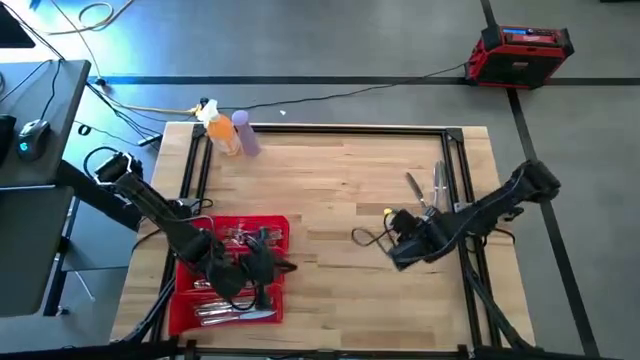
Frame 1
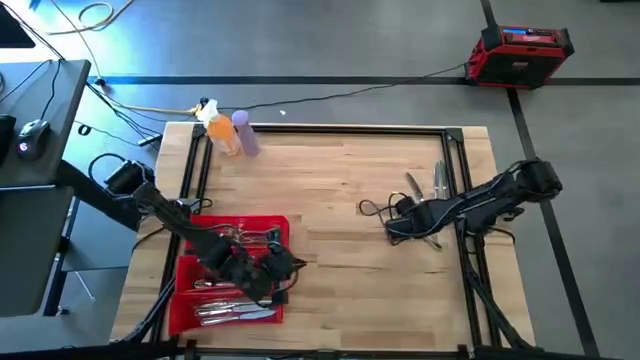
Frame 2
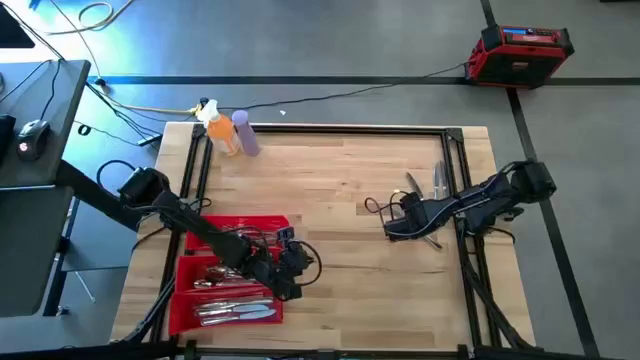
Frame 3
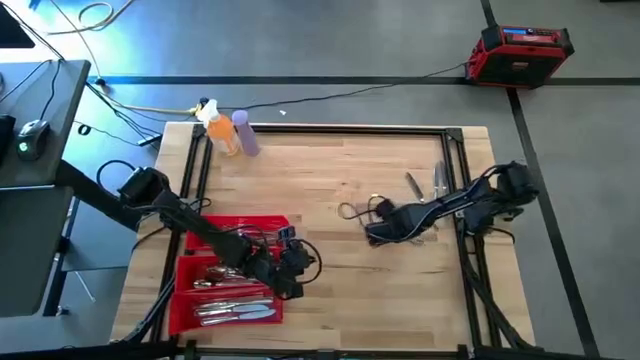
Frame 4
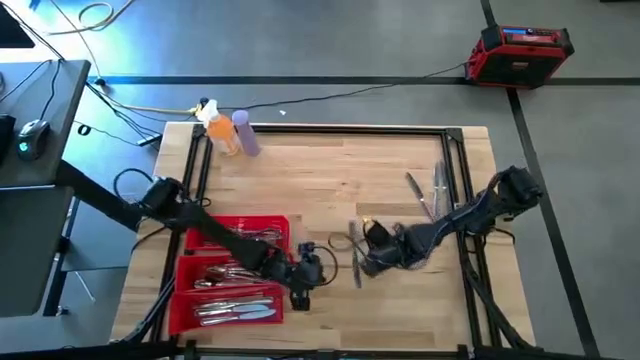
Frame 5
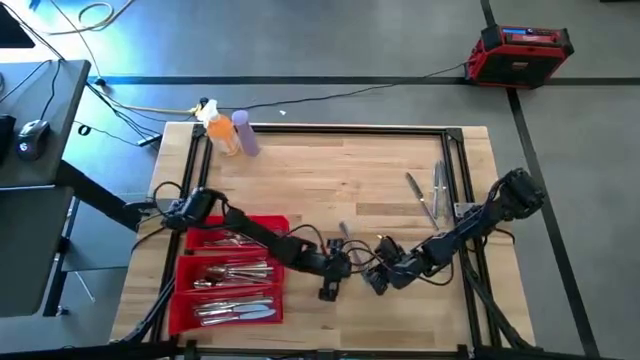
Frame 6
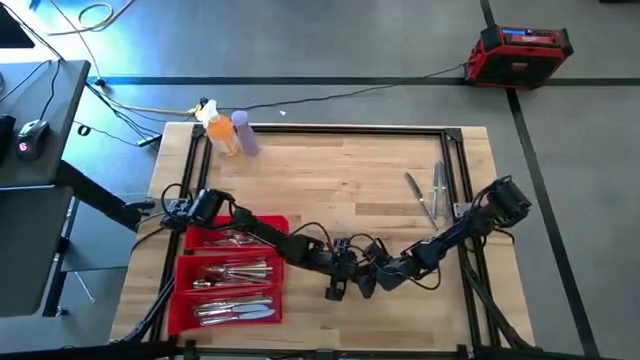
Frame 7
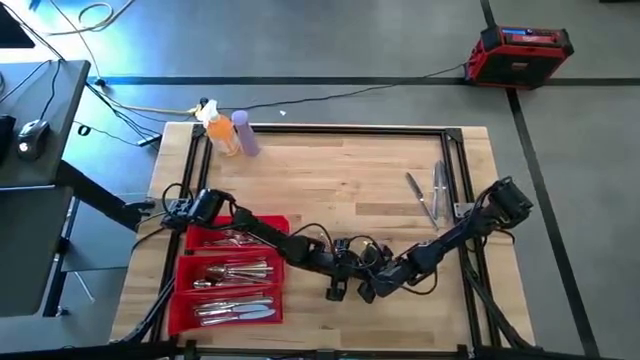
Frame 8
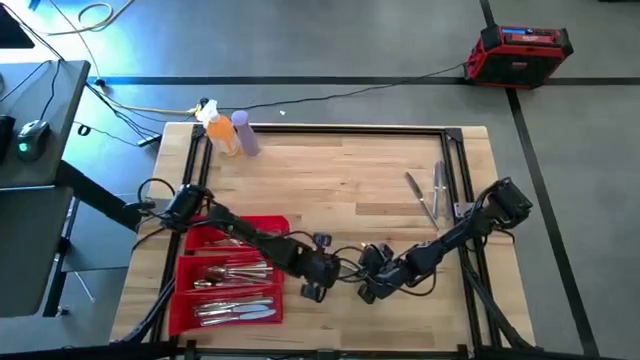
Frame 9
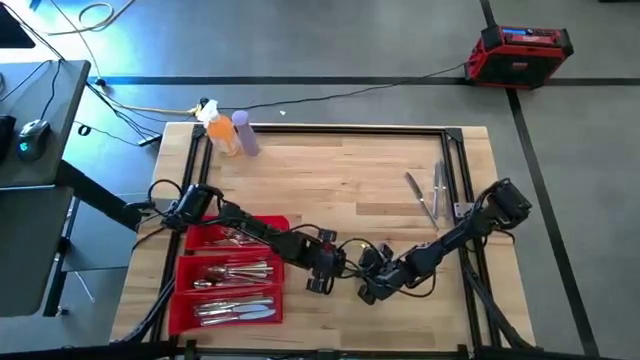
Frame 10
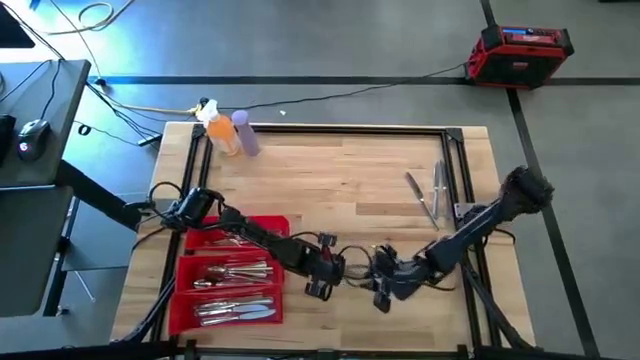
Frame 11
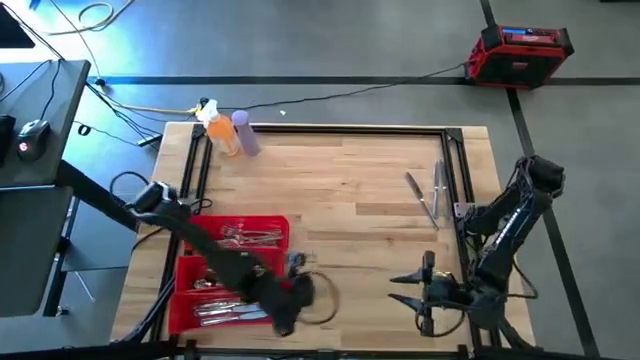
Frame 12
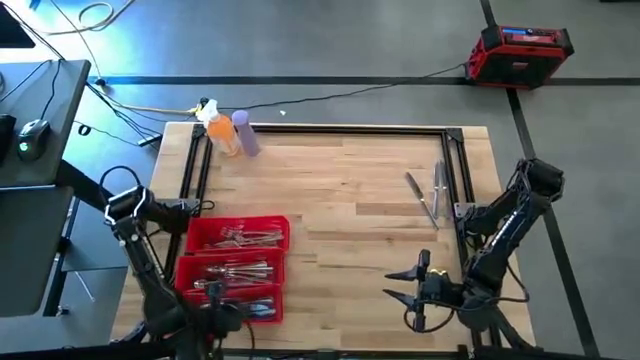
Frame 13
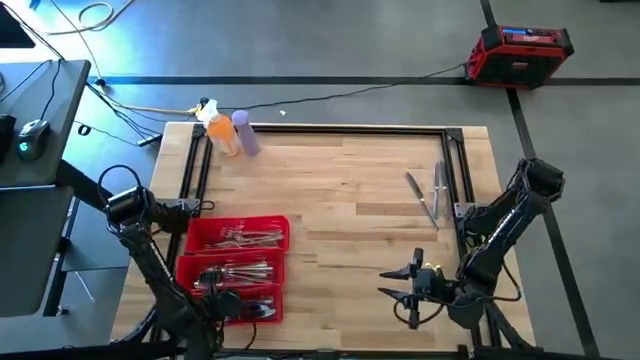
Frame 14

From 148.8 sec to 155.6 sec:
Task: Sort silverware
Put the silver knife in the bottom red bin

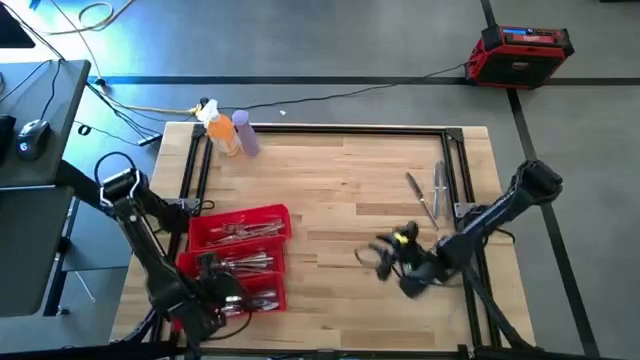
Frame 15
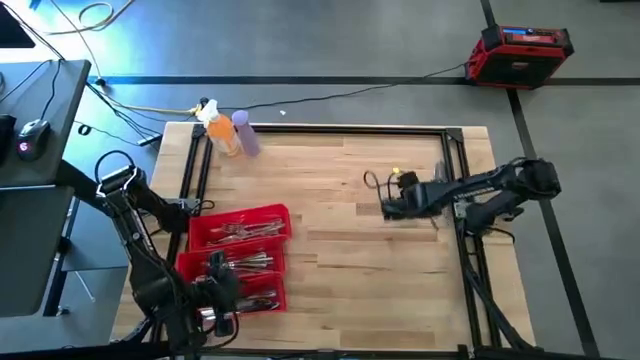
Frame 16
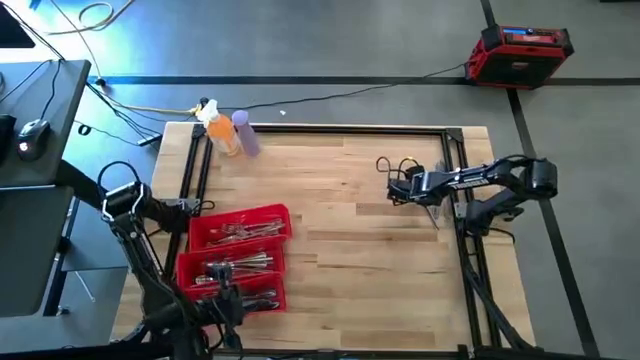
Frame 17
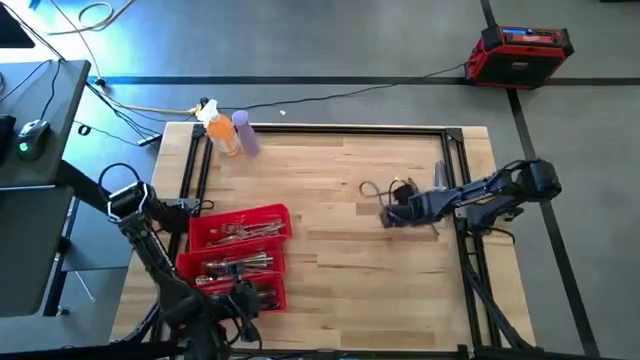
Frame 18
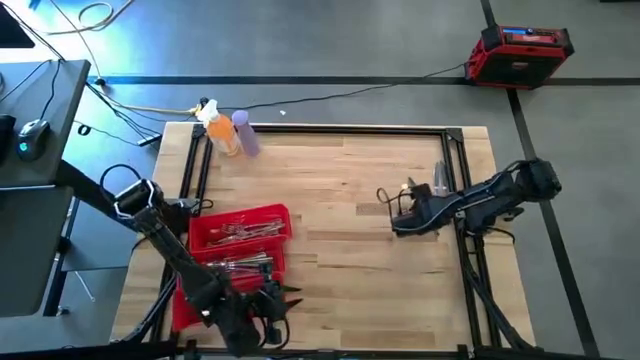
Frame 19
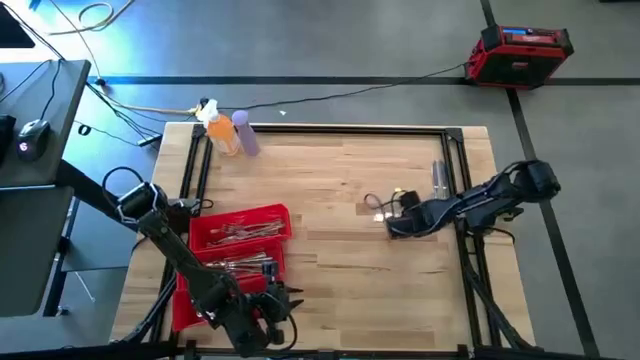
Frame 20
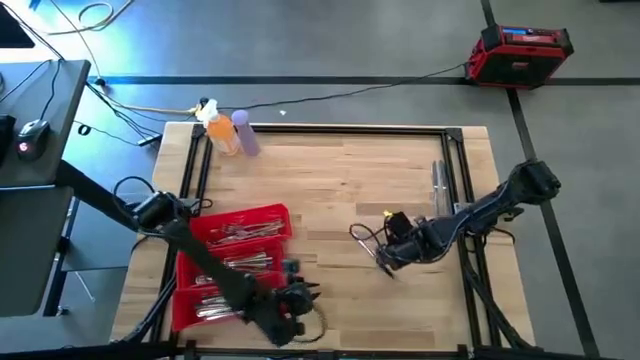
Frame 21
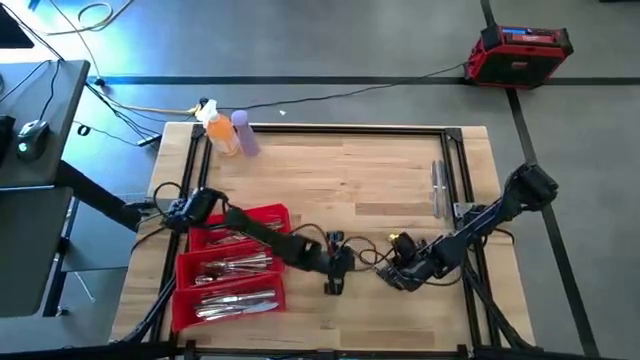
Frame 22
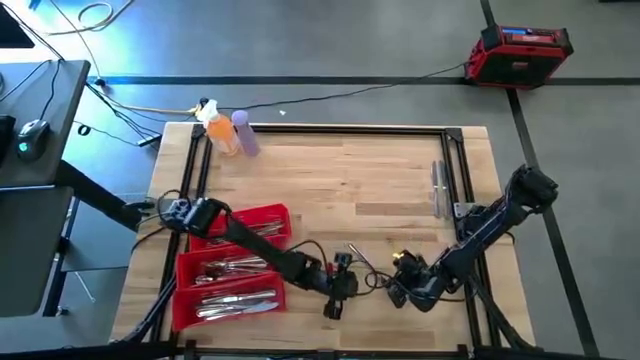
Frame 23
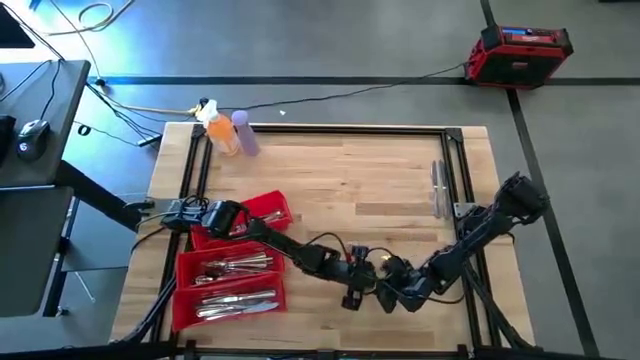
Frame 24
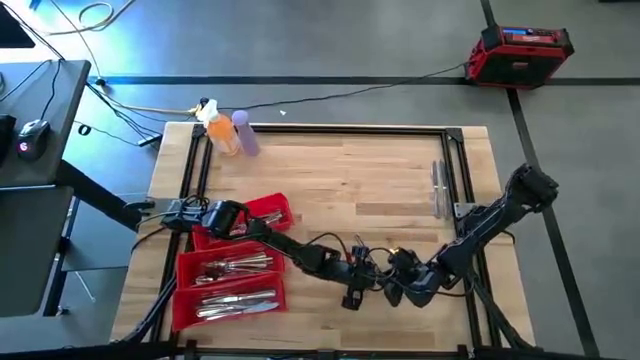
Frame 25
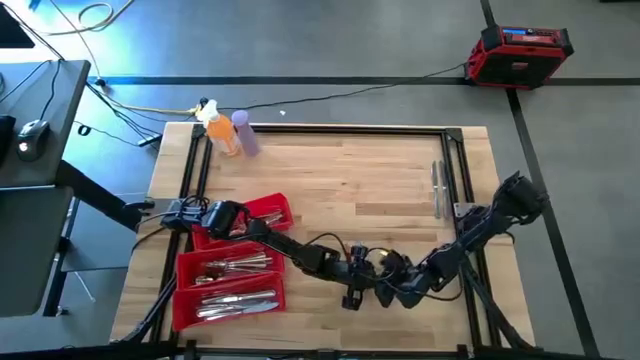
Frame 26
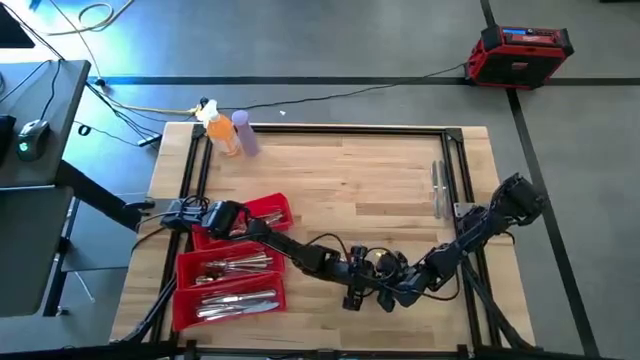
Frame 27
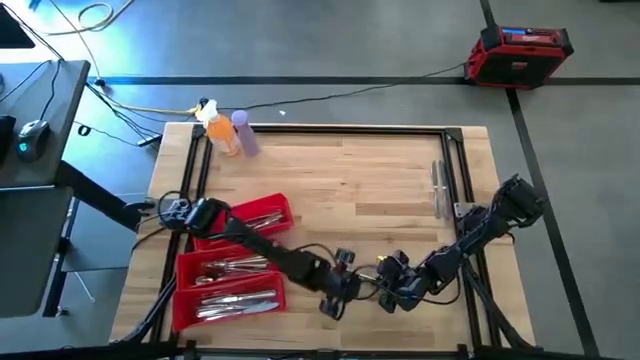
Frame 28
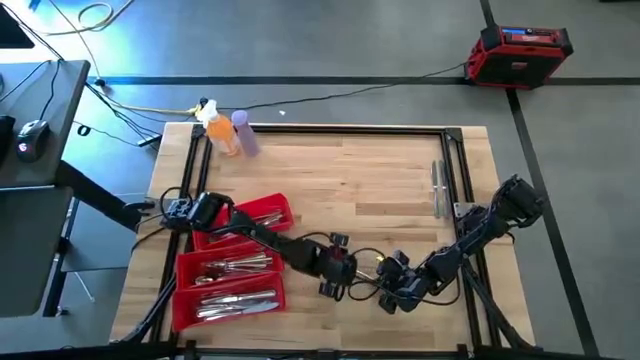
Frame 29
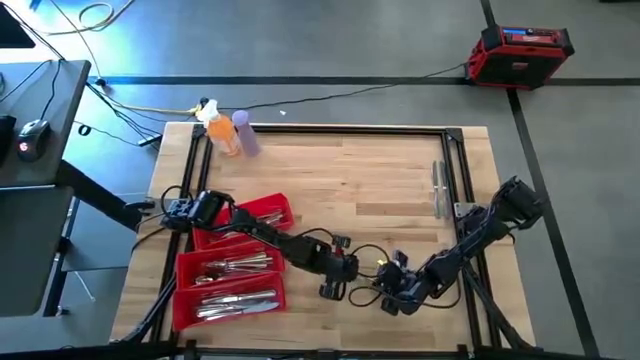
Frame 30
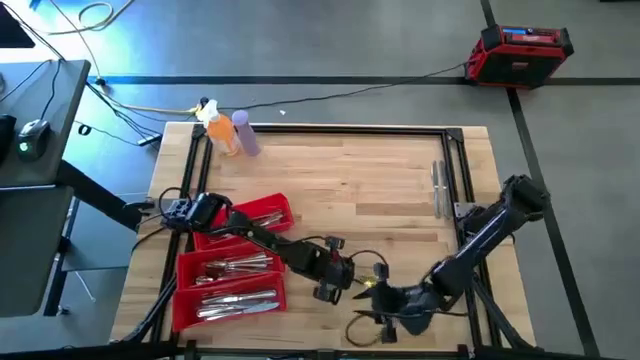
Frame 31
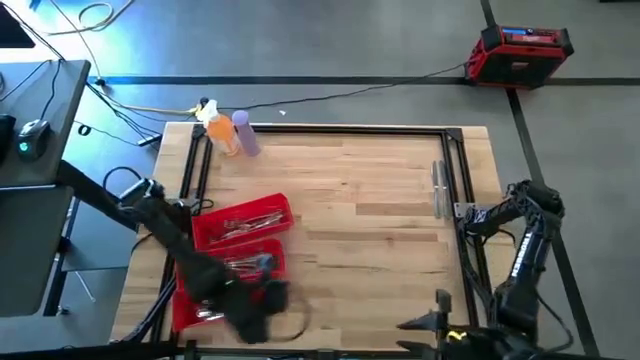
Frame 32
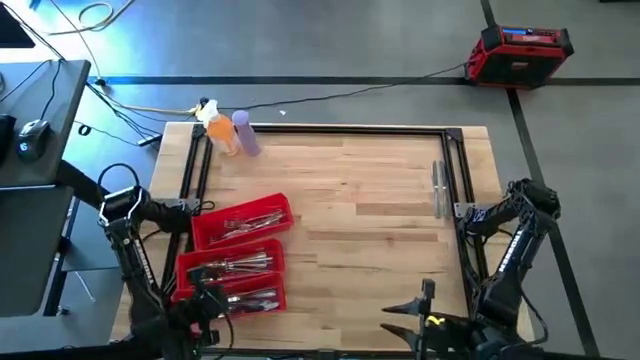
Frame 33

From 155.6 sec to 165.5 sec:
Put the silver knife in the bottom red bin

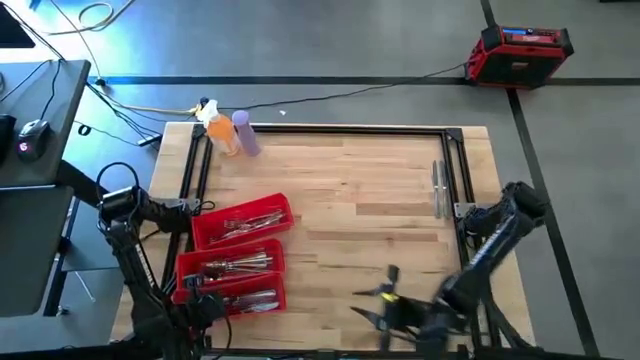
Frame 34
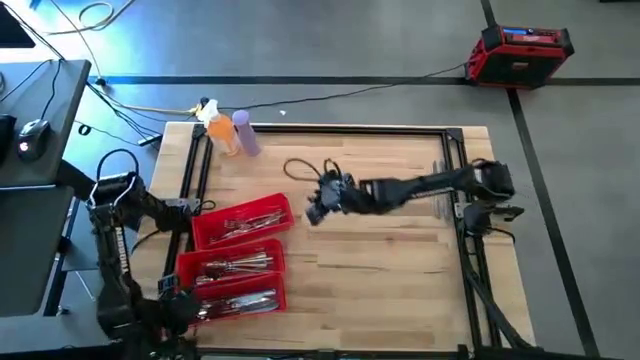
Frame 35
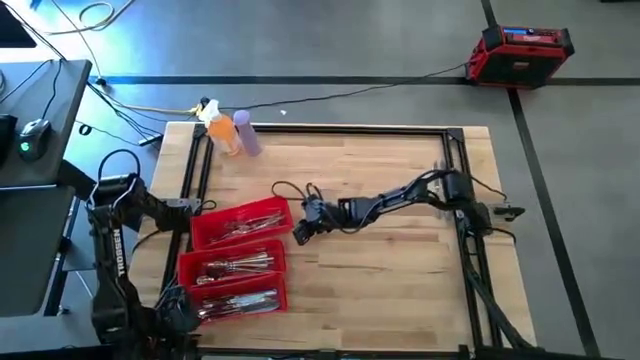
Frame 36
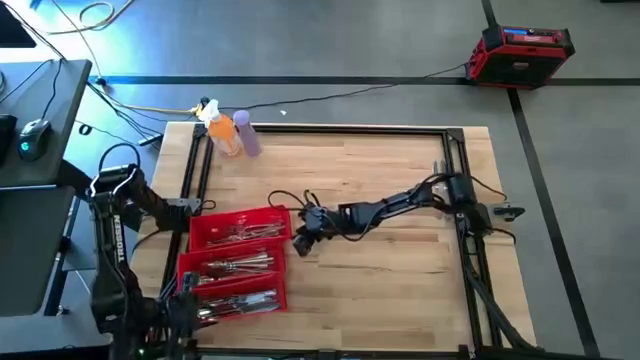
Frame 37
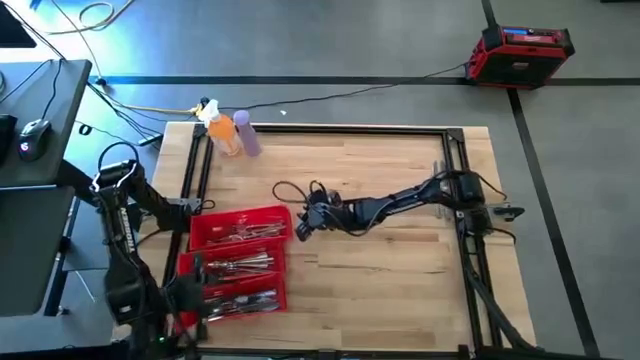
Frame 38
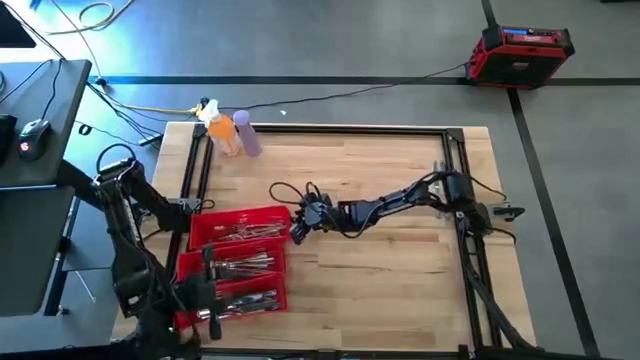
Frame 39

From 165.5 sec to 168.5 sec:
Adjust the top red bin

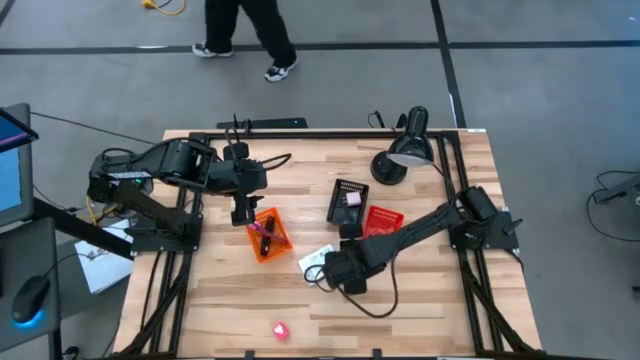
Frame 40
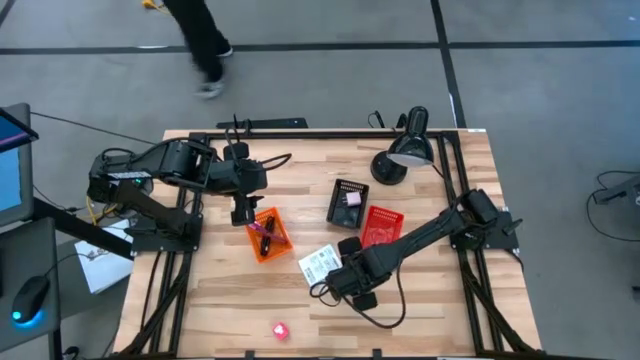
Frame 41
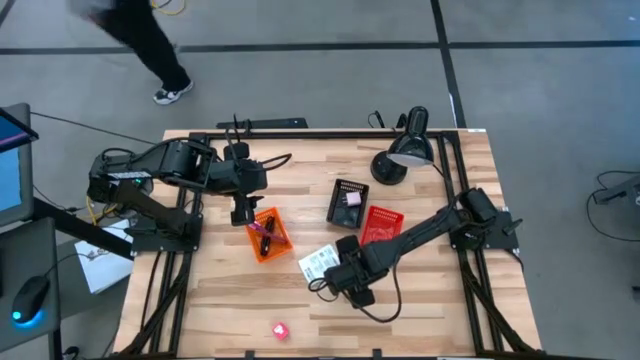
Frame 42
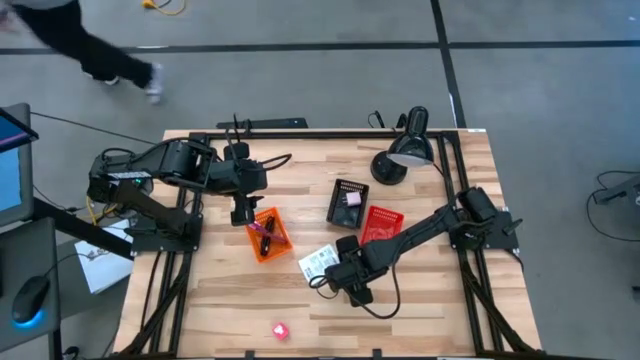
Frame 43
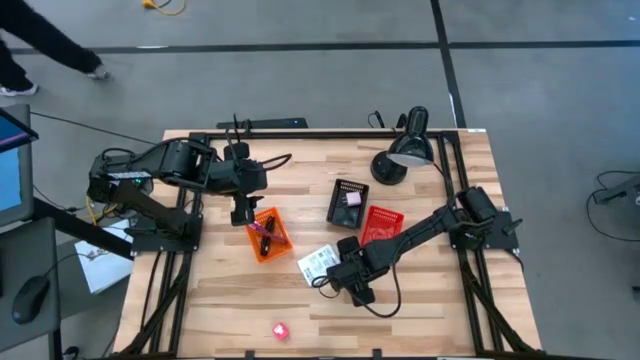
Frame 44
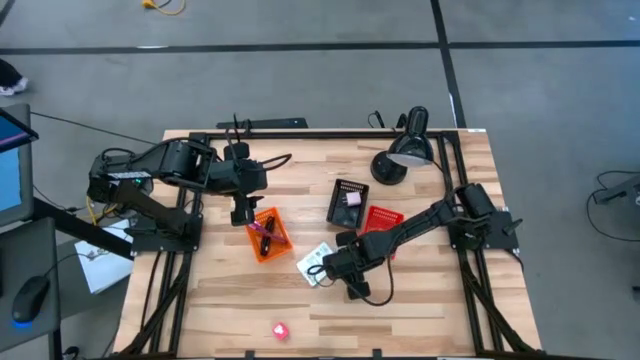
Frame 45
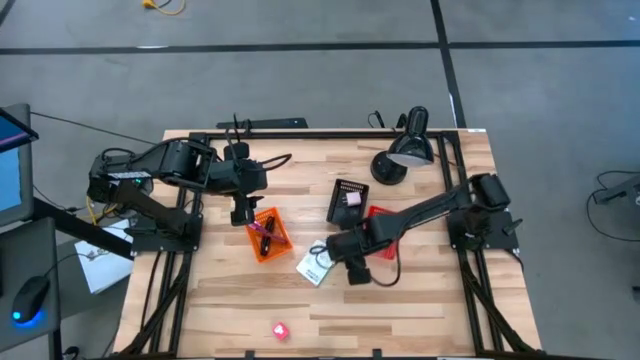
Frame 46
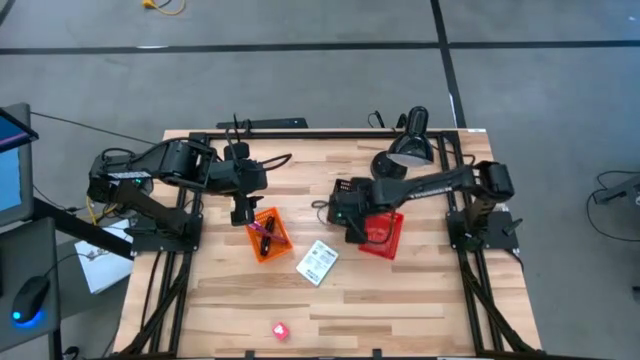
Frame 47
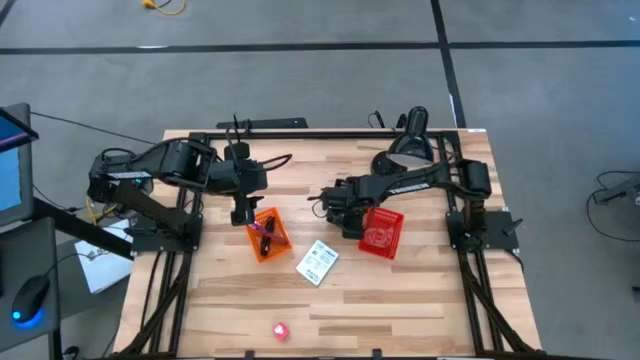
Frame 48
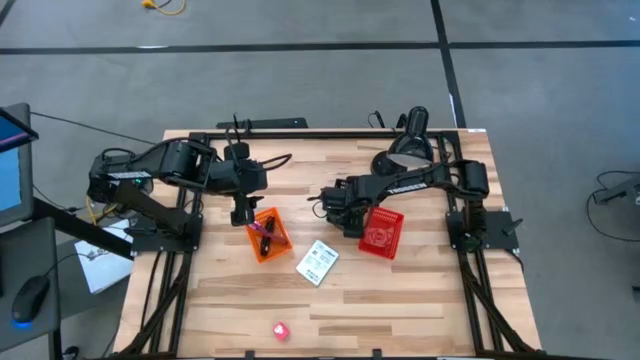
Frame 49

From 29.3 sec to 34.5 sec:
Task: Pick and place items into bin
Put the blue charger adapter into the black bin
